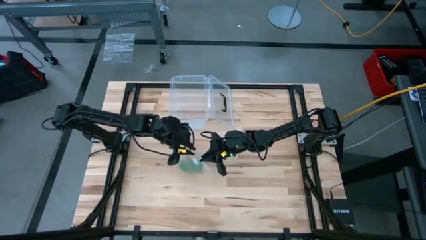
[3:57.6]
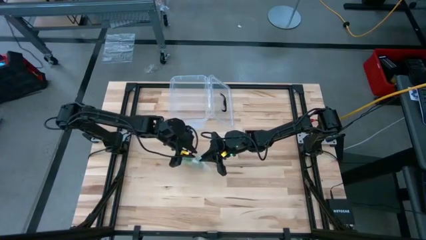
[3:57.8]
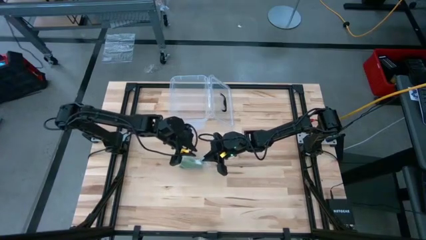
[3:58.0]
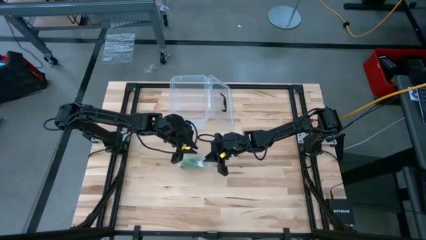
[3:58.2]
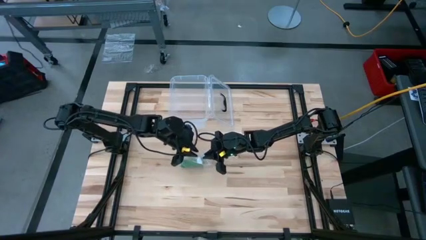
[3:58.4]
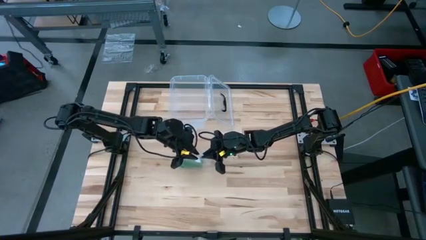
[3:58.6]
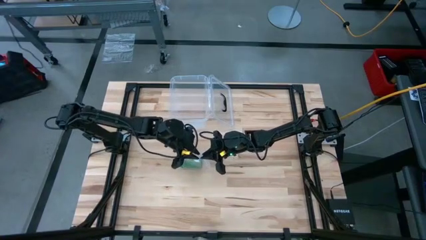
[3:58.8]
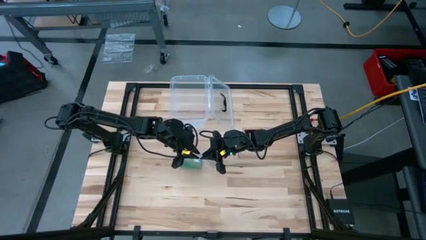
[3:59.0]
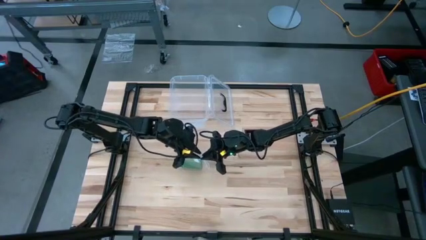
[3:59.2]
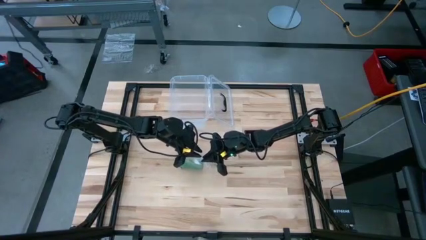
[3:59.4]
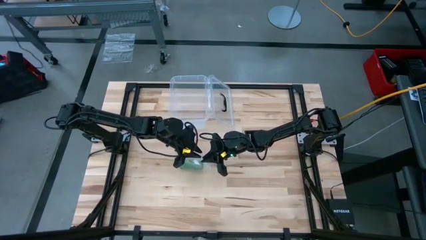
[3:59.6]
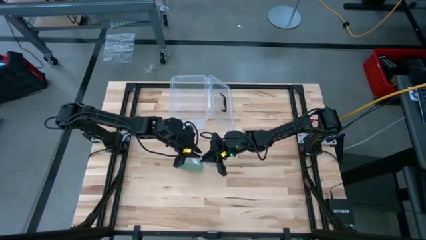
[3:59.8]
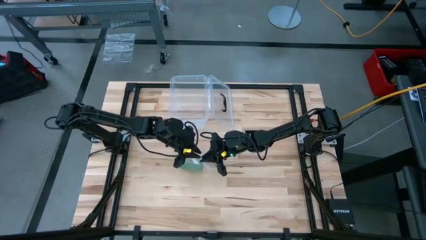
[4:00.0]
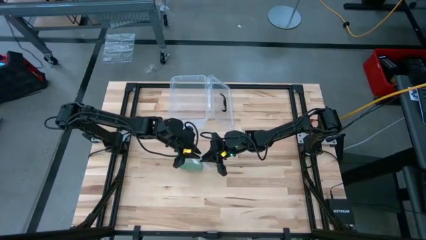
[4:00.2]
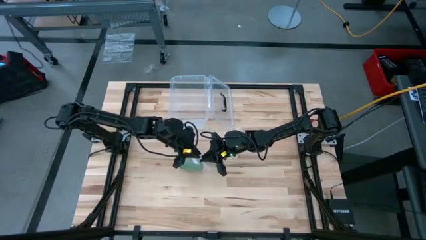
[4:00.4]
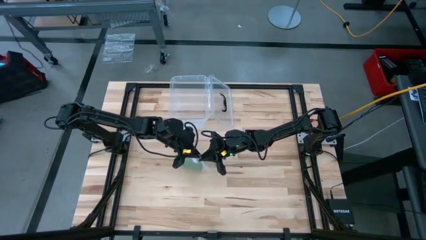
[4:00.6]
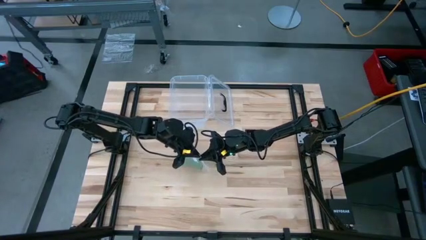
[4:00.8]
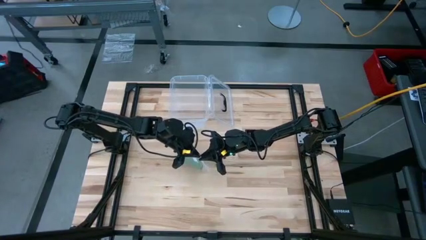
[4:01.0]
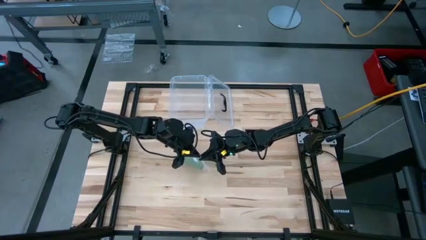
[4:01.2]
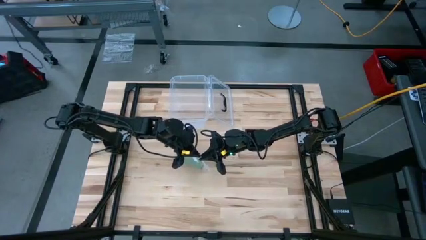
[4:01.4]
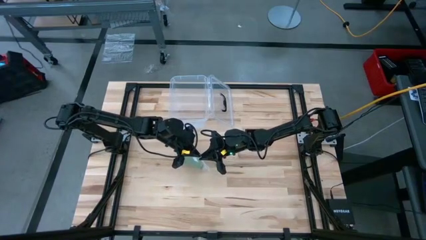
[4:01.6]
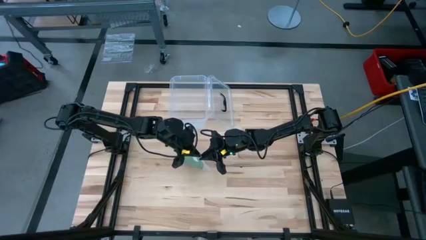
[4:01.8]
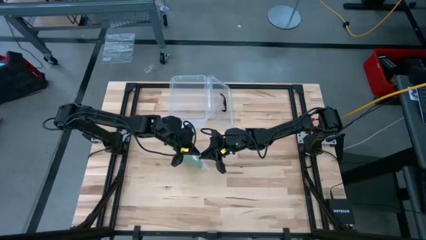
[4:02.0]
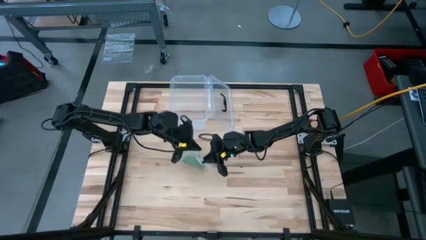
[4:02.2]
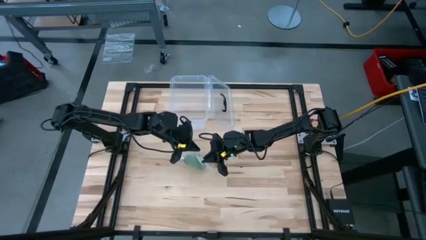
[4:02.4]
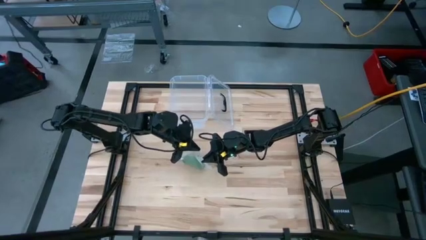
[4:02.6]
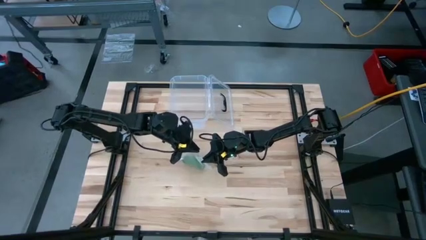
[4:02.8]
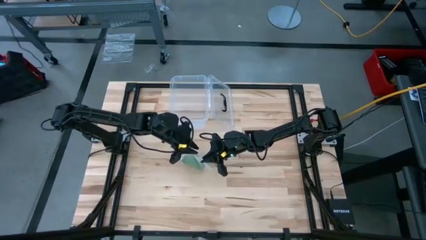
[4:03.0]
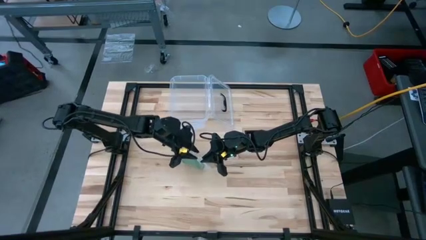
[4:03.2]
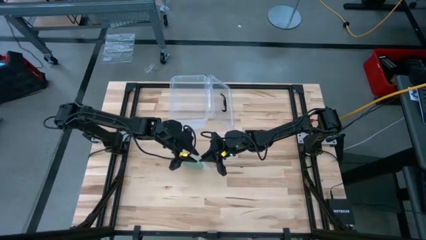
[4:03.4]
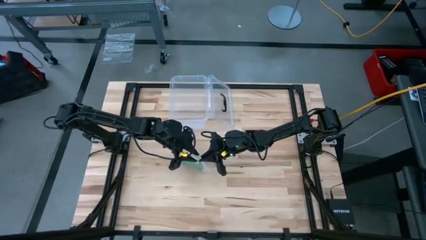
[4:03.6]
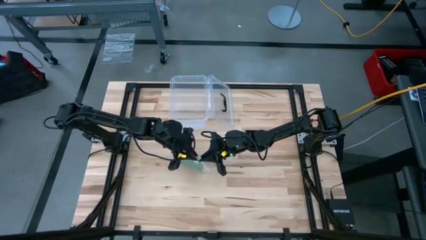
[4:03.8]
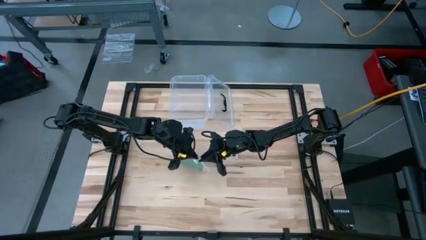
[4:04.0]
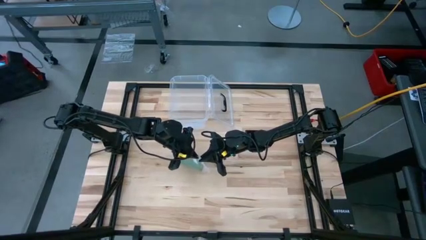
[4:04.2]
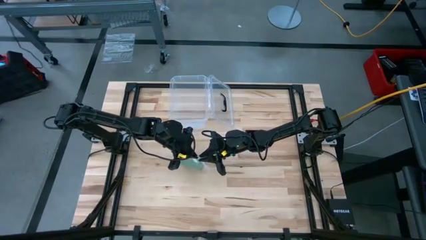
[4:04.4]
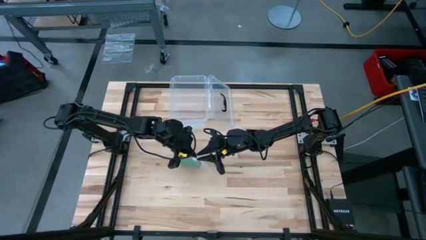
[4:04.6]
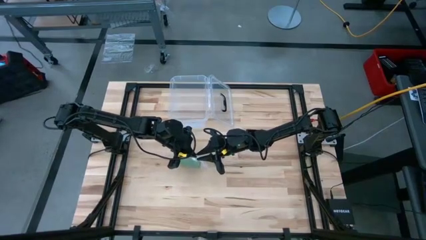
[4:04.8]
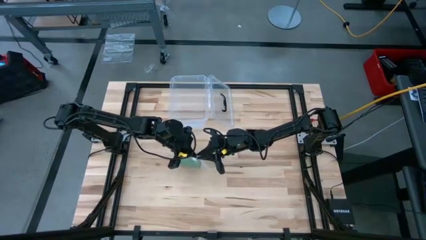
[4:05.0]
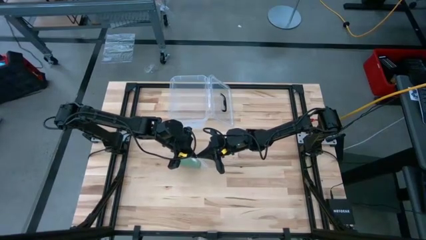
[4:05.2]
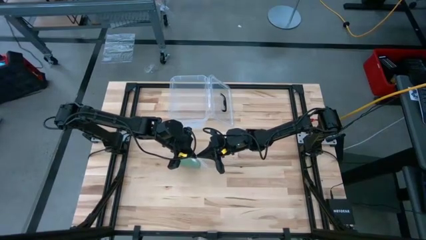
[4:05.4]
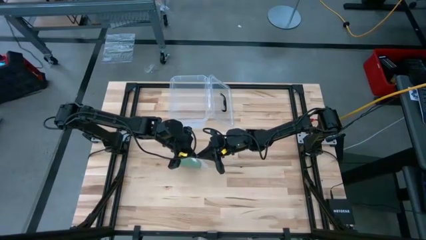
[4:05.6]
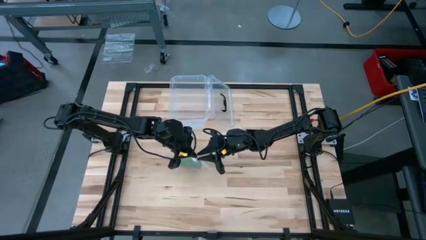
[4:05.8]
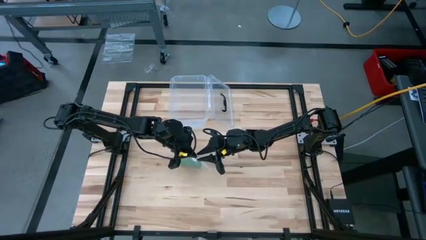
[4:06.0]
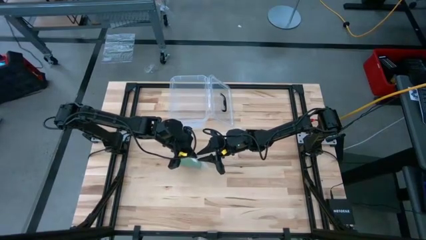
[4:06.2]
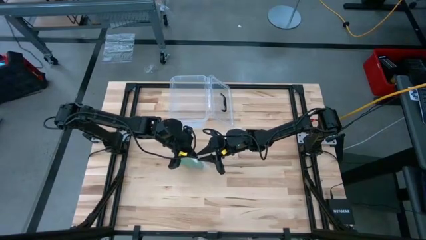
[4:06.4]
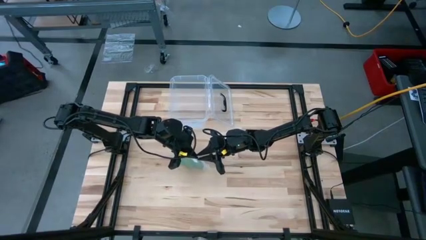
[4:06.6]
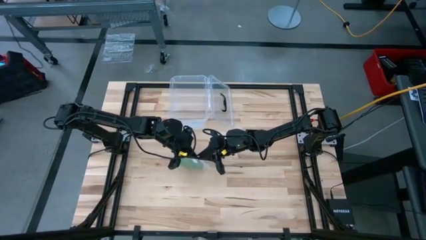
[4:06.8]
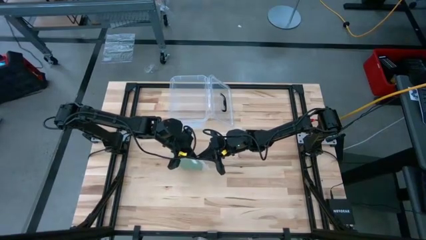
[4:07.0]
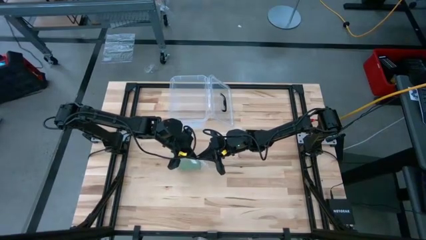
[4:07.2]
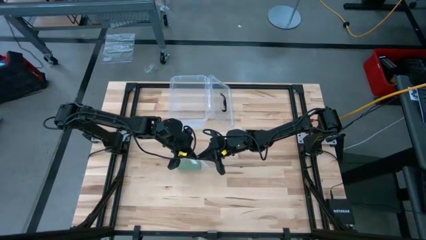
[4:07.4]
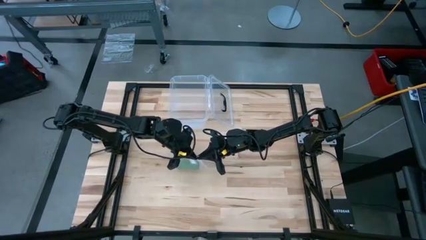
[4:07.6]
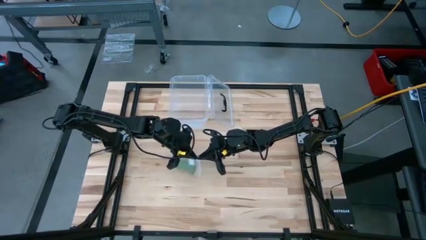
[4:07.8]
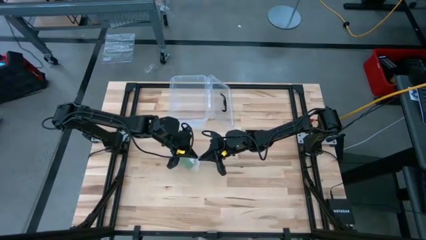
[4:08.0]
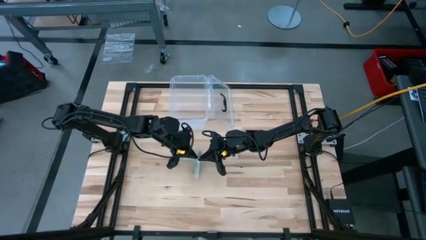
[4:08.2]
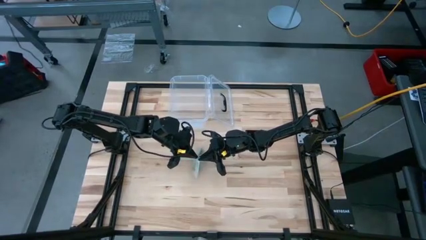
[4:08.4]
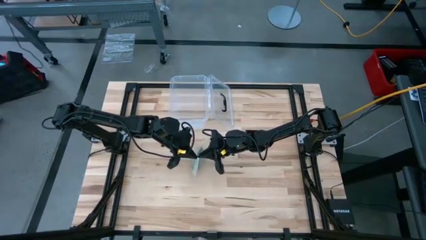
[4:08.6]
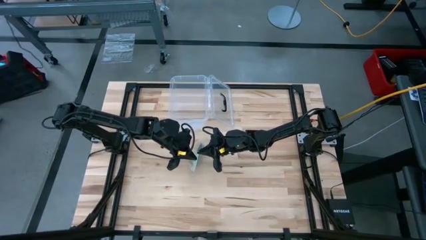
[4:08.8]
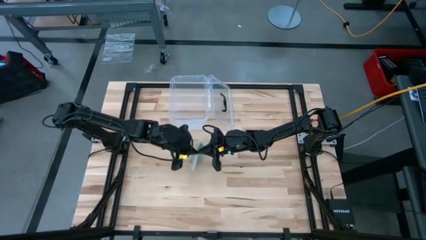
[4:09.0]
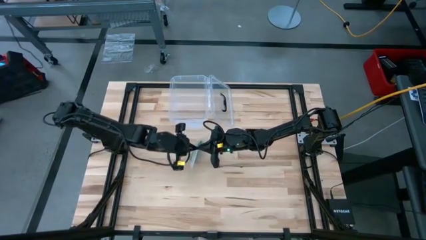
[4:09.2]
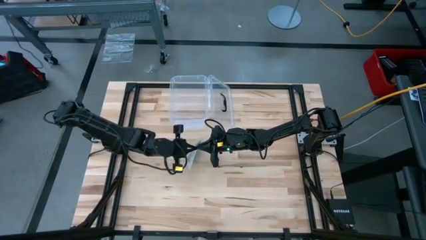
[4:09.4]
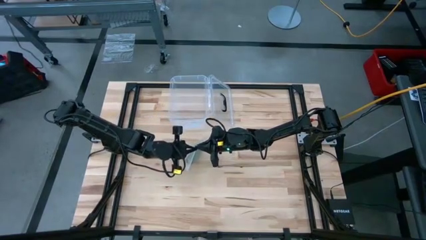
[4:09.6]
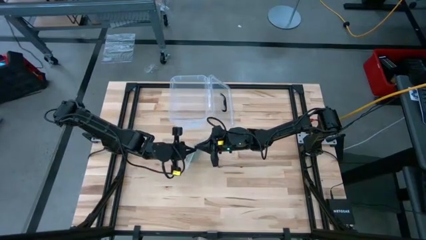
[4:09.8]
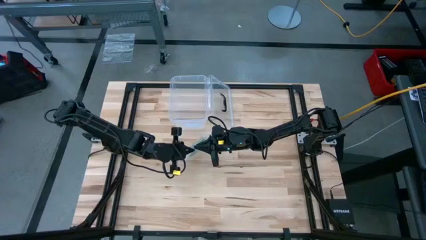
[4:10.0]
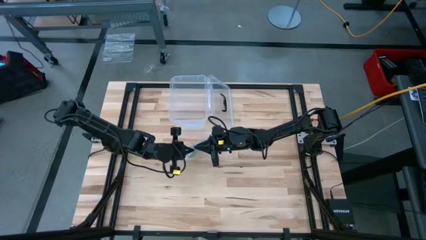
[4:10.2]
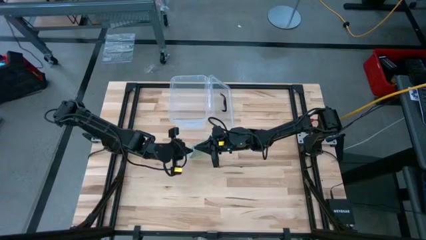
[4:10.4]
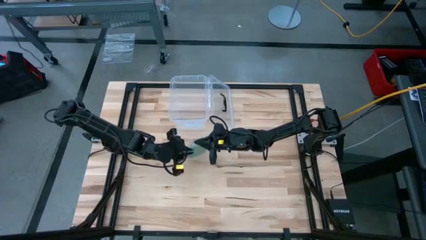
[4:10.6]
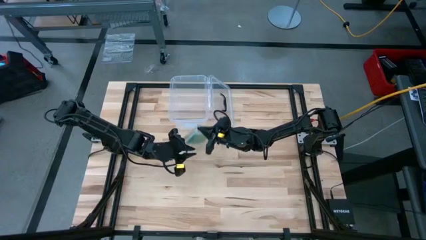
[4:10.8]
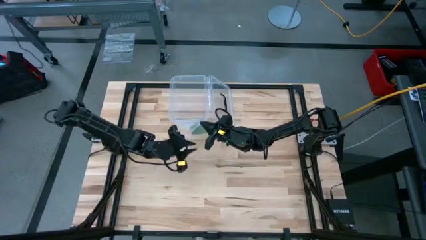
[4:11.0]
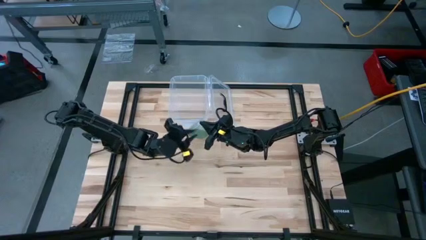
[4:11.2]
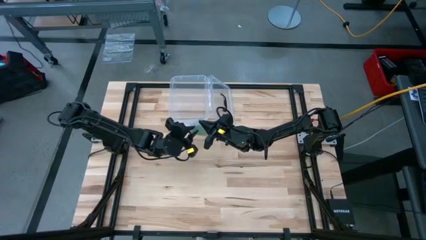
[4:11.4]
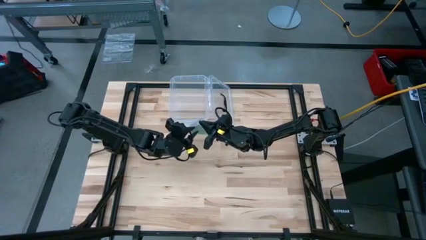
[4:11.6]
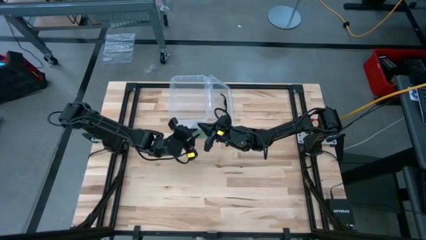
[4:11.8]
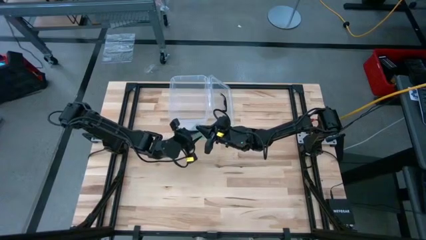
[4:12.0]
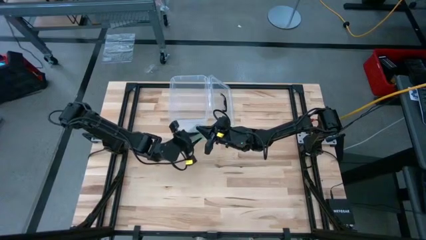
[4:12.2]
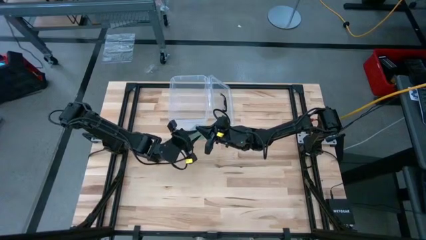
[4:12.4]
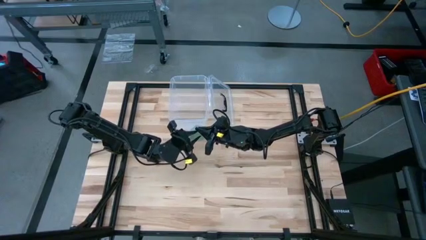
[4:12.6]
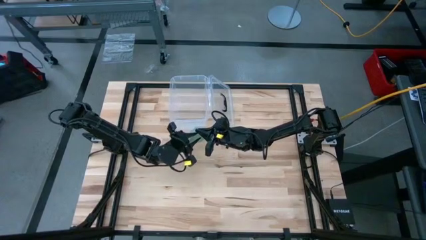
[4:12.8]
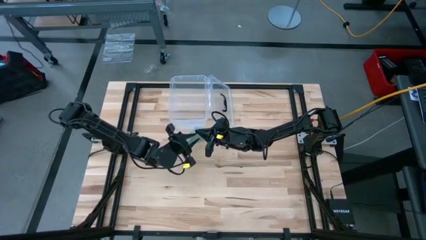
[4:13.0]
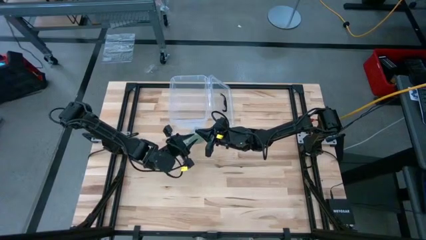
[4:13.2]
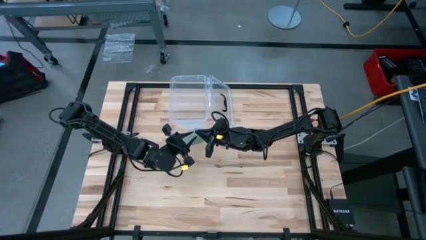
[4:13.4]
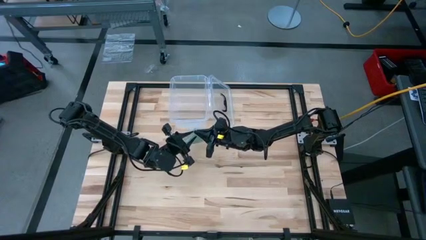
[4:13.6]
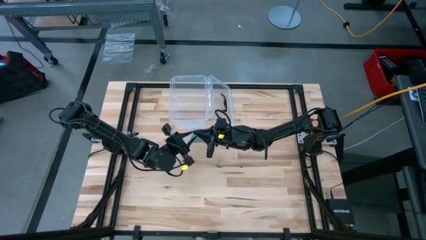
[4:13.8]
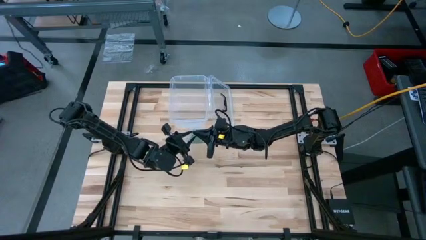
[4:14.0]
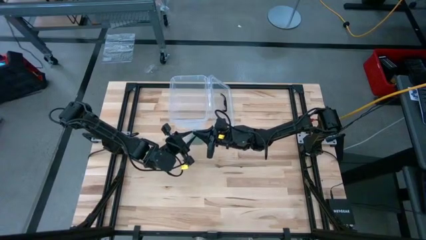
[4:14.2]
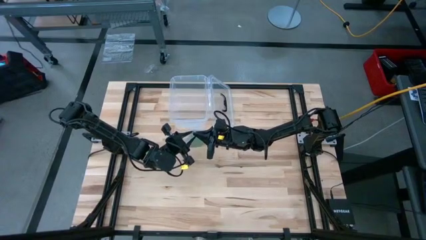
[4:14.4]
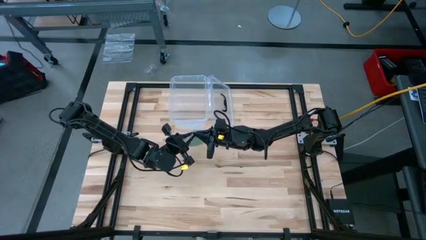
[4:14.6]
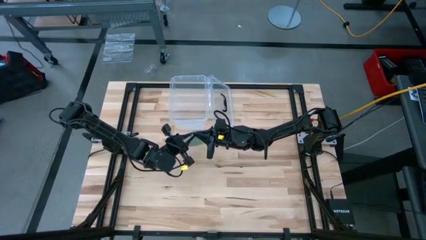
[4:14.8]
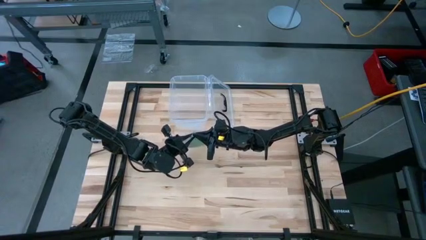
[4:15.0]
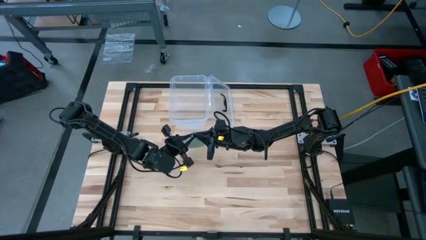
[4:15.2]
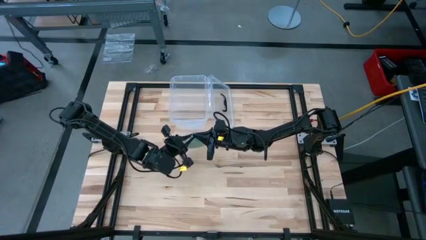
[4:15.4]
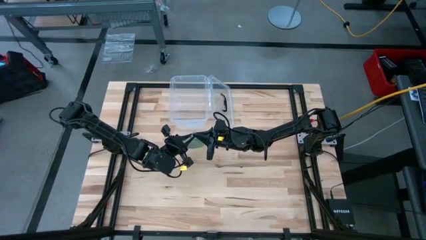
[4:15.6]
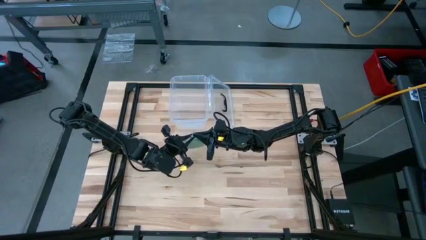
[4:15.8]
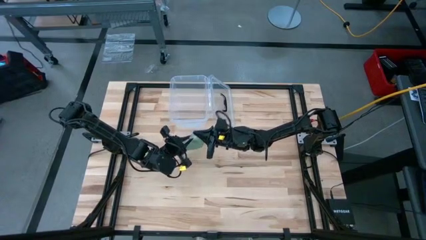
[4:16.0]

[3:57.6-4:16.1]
Task: Roll bandage
Close the transparent zip bag
